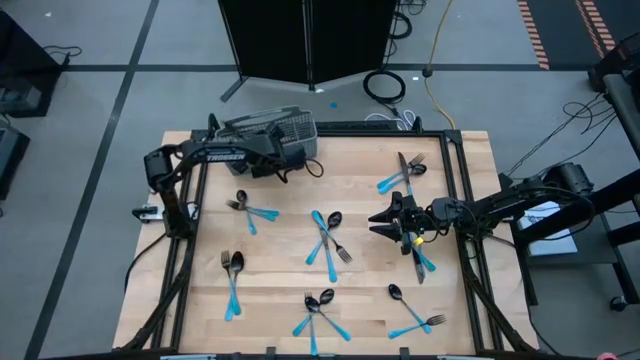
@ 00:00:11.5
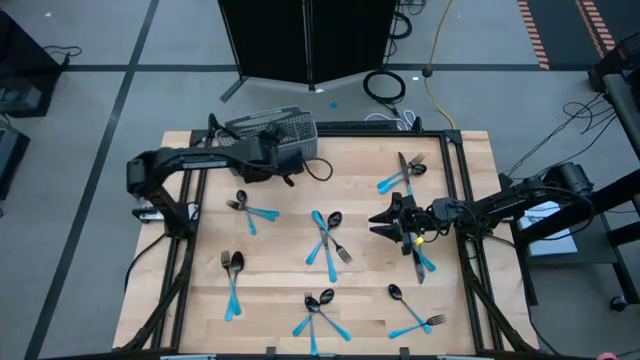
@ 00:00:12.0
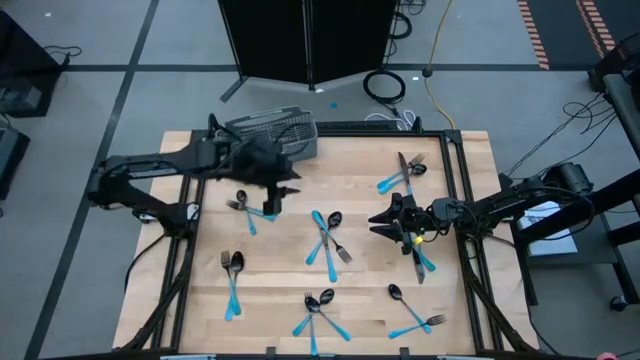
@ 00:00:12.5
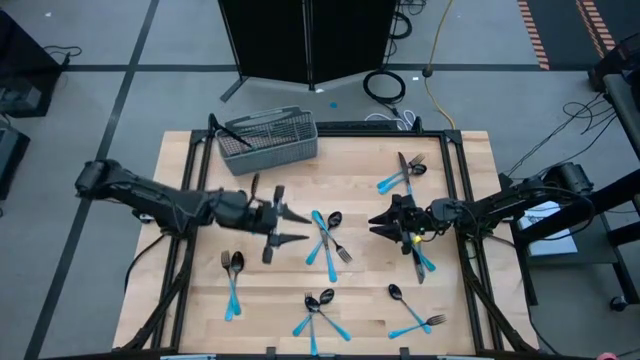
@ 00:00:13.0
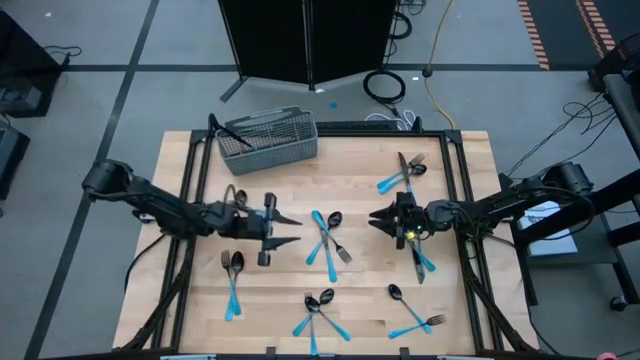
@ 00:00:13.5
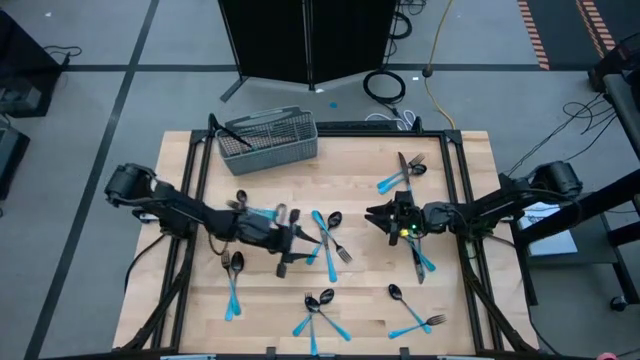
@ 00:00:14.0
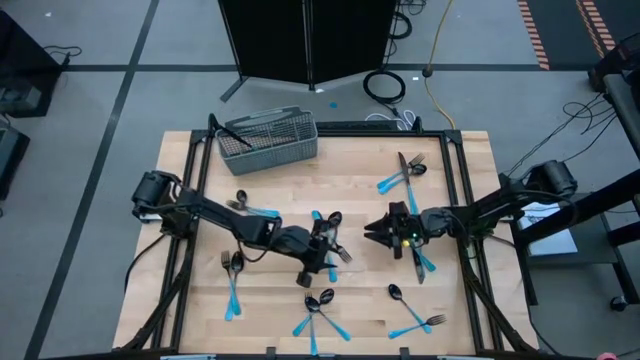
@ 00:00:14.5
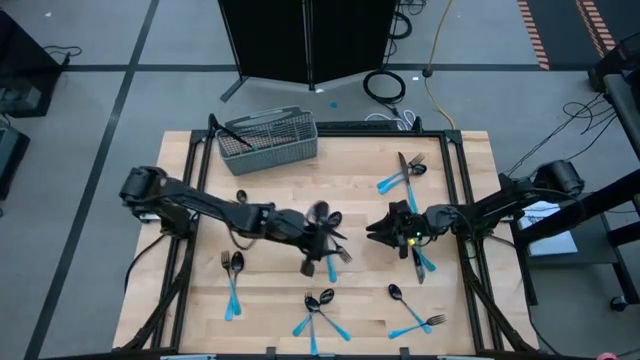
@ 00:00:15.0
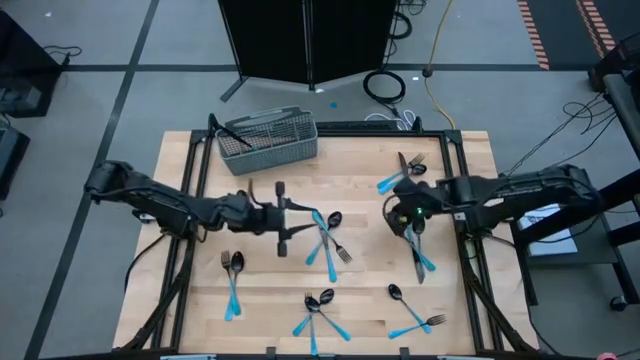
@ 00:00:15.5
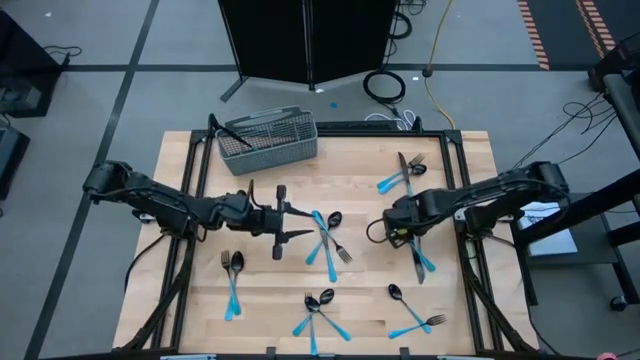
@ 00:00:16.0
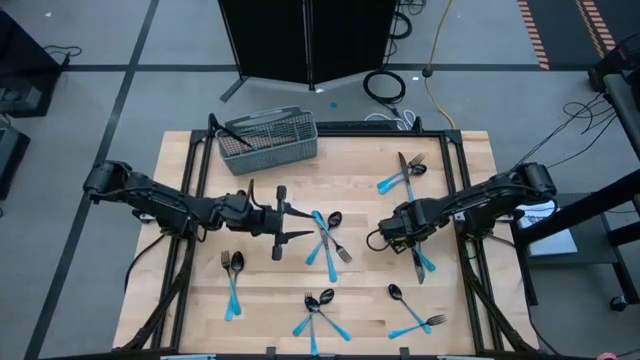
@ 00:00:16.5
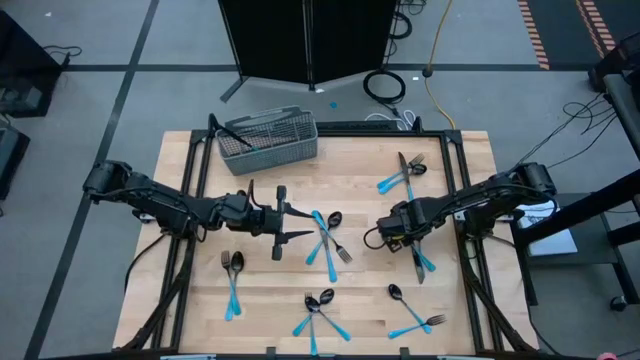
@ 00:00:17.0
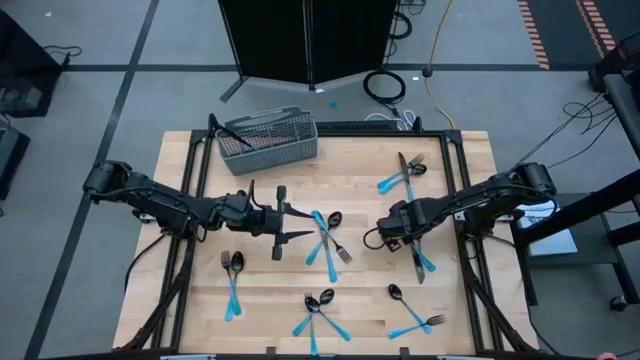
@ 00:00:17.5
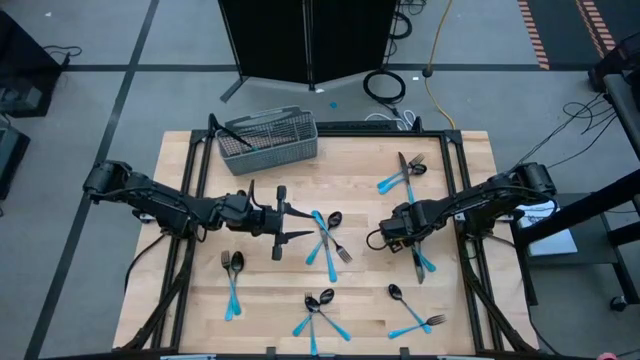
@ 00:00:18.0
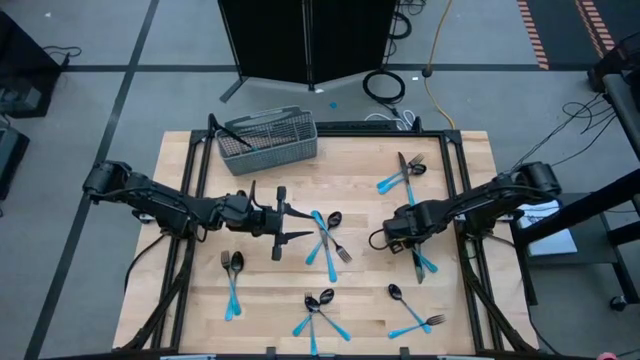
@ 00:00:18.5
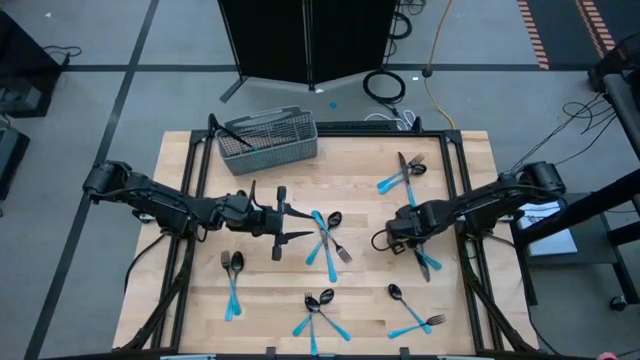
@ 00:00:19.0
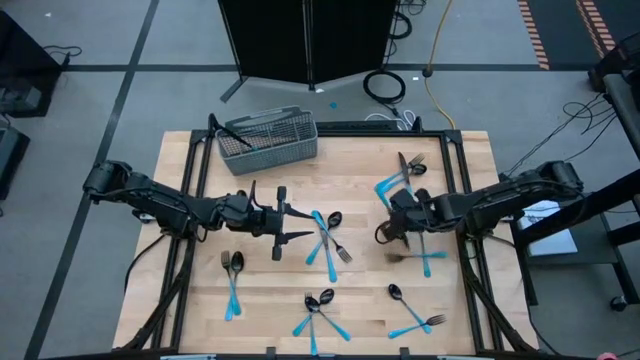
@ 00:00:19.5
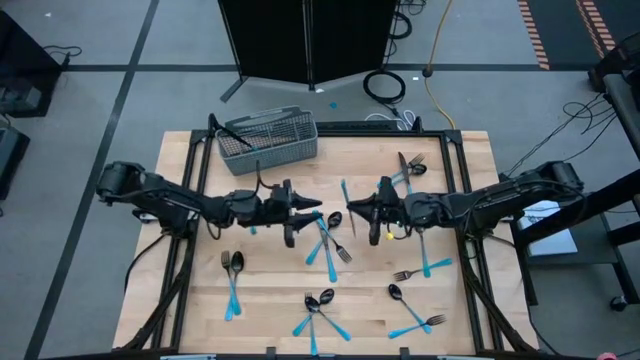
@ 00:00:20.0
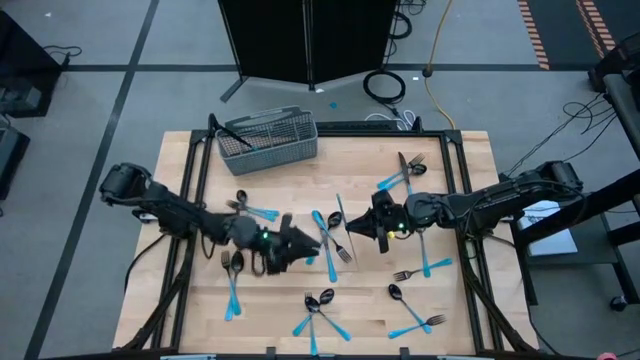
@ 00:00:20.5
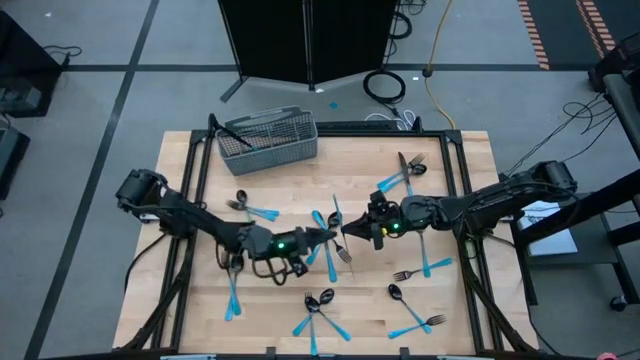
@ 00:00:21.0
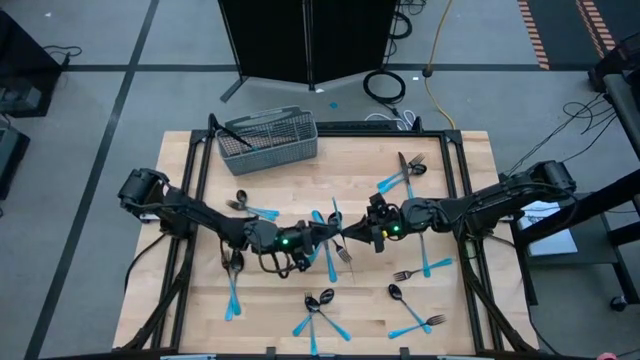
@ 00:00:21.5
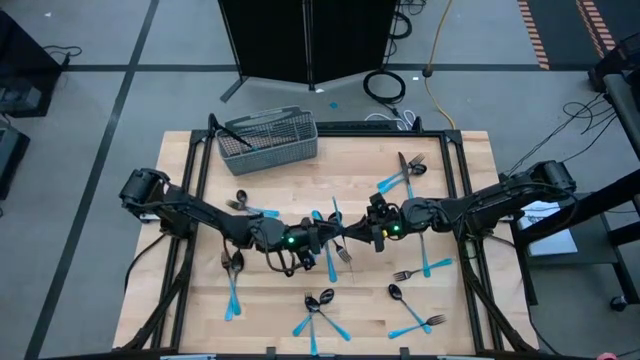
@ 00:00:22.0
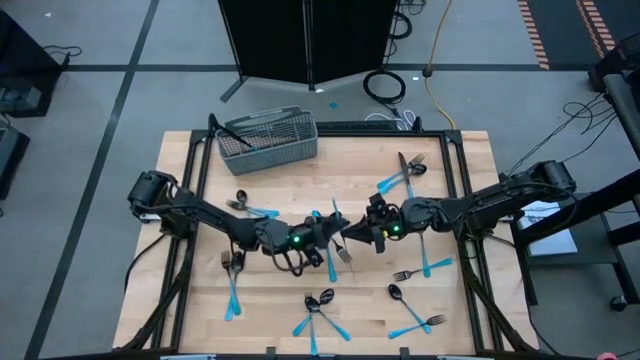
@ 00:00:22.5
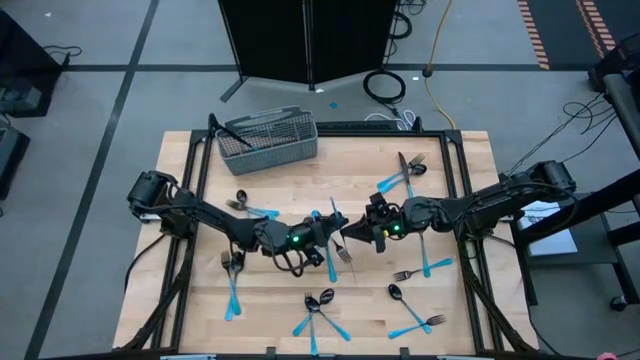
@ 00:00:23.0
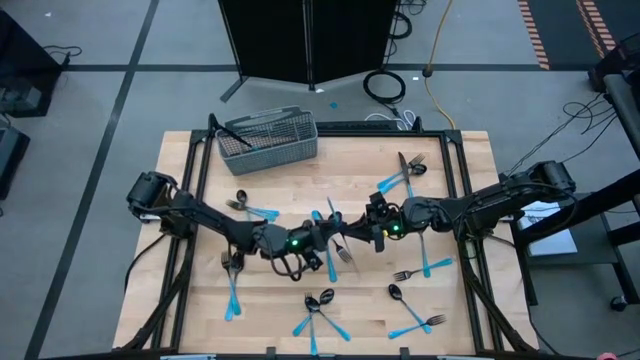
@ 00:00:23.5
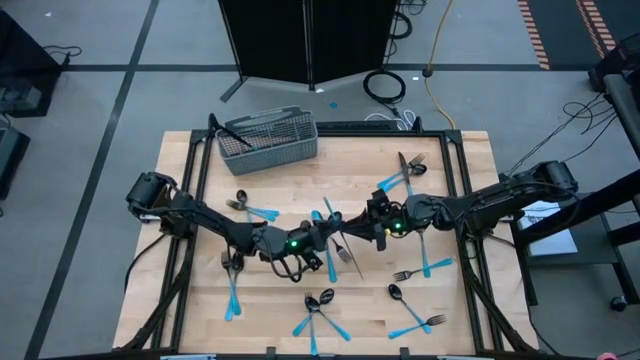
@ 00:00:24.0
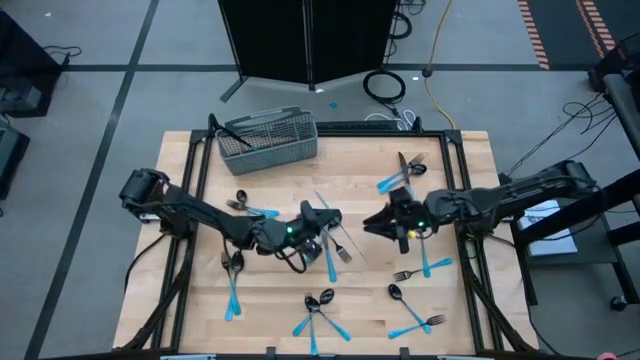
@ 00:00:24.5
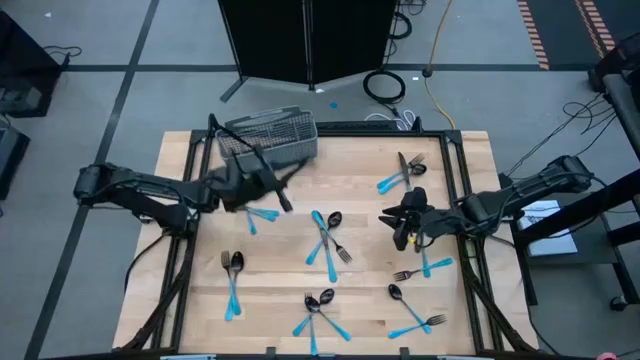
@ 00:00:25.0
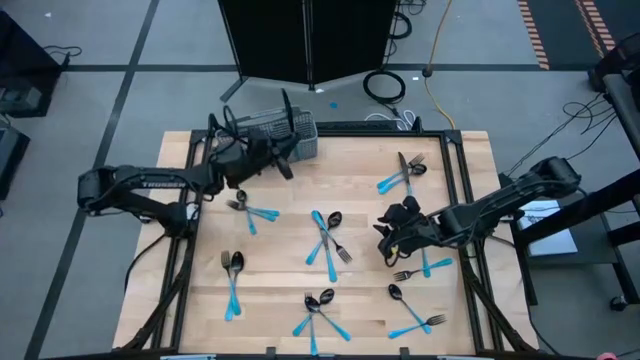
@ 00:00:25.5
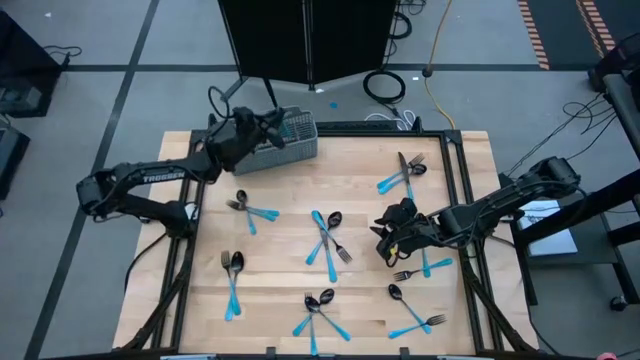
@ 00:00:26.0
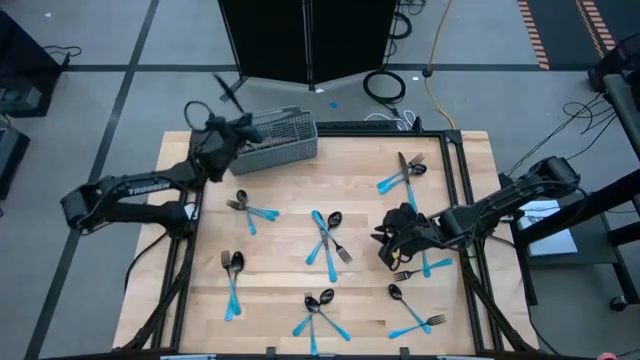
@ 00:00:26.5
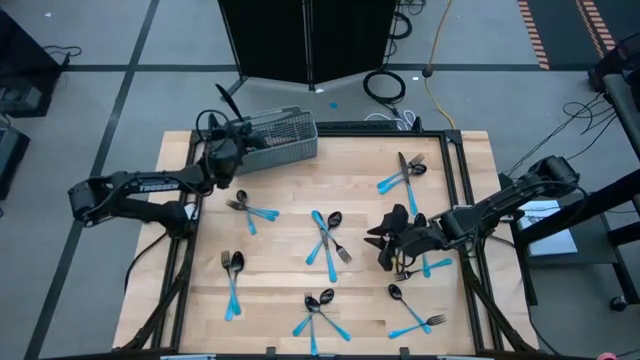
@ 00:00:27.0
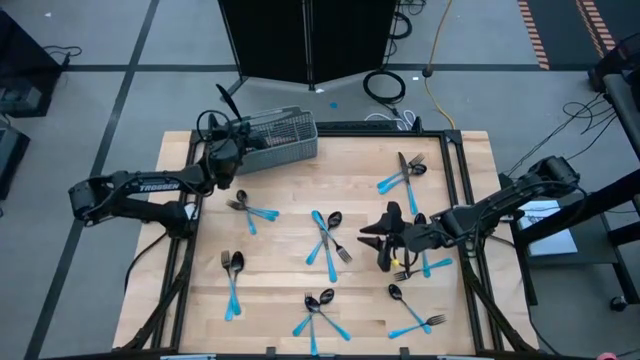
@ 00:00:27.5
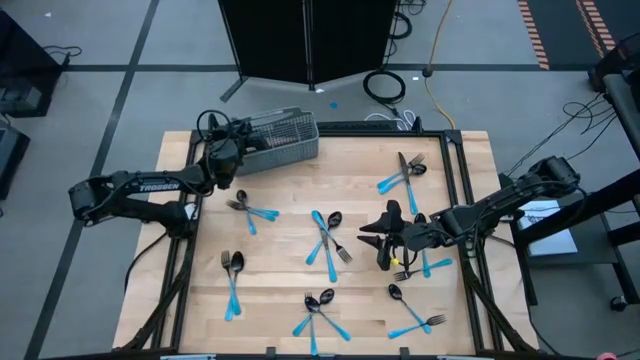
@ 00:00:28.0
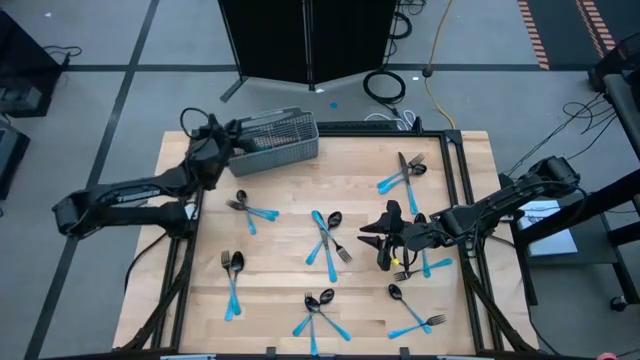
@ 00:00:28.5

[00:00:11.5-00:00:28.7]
Task: Sort silverware
Put the blue knife into the silverware basket
